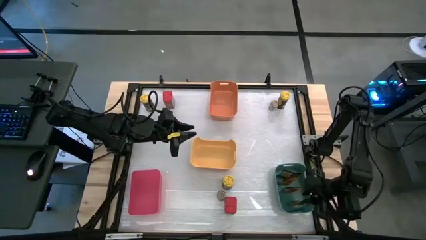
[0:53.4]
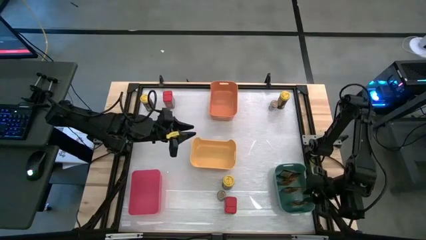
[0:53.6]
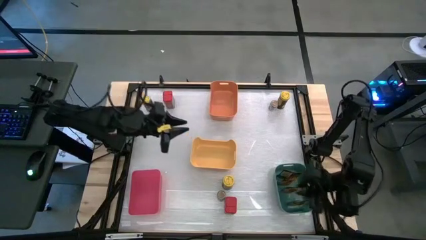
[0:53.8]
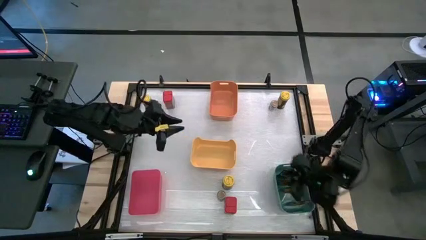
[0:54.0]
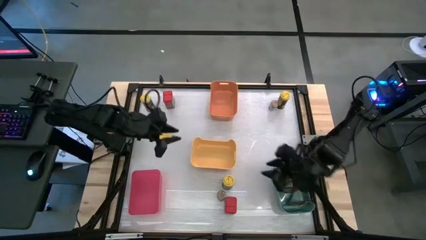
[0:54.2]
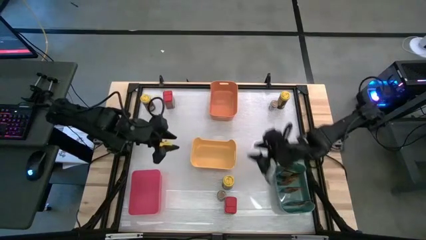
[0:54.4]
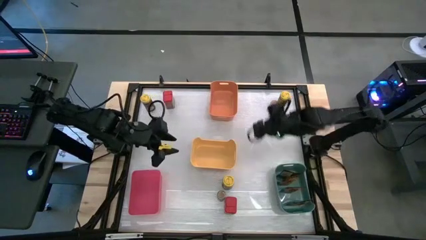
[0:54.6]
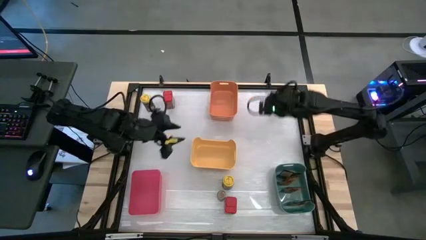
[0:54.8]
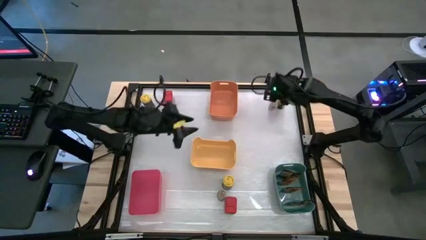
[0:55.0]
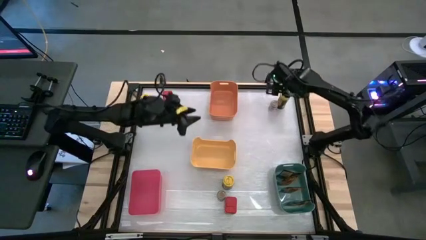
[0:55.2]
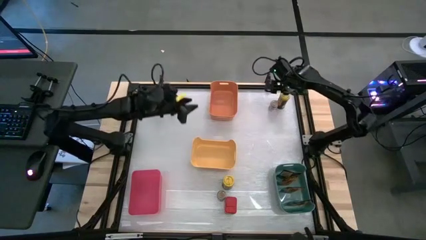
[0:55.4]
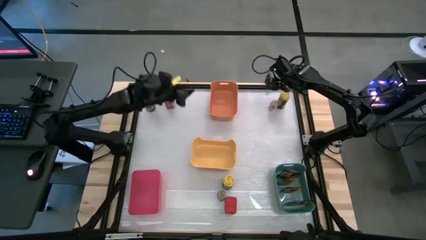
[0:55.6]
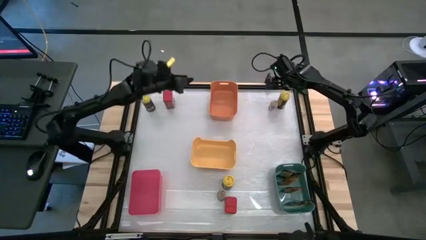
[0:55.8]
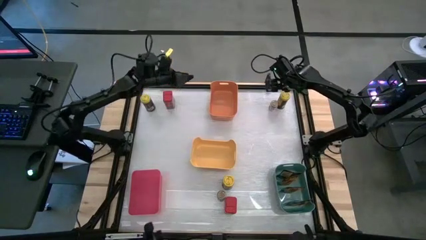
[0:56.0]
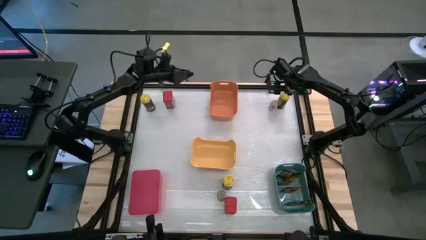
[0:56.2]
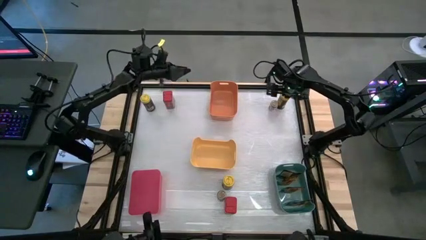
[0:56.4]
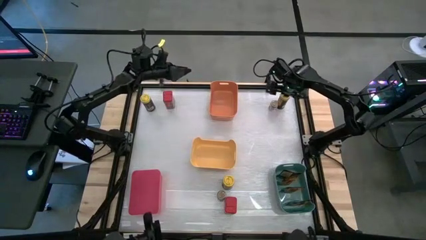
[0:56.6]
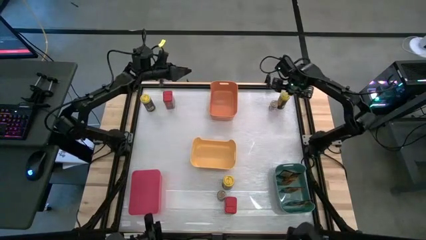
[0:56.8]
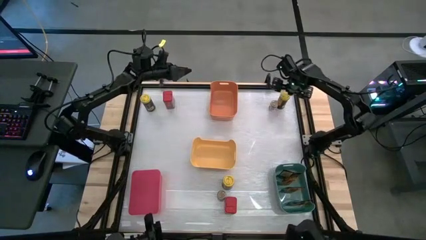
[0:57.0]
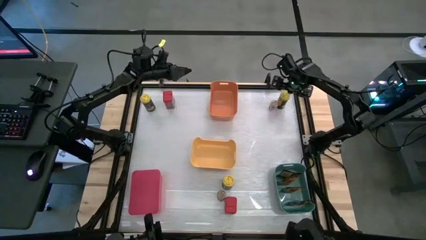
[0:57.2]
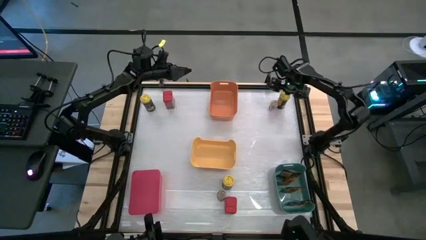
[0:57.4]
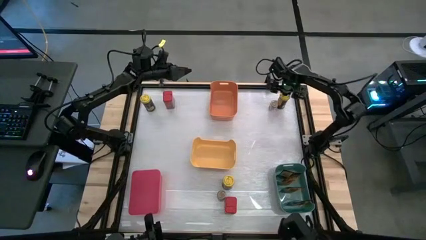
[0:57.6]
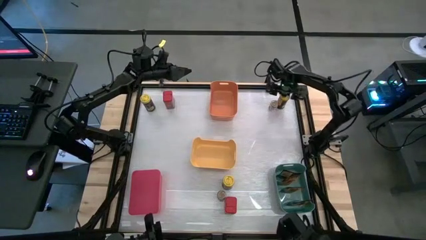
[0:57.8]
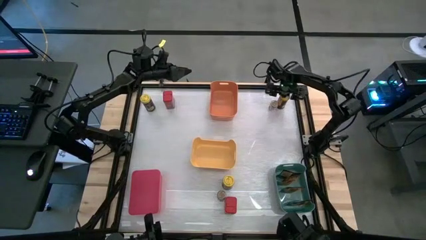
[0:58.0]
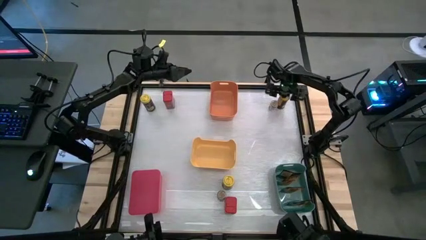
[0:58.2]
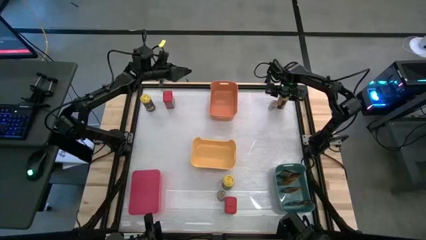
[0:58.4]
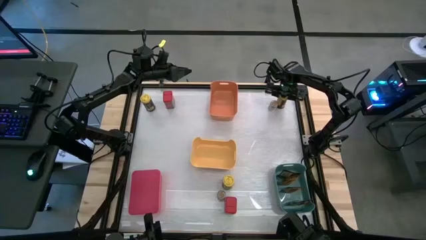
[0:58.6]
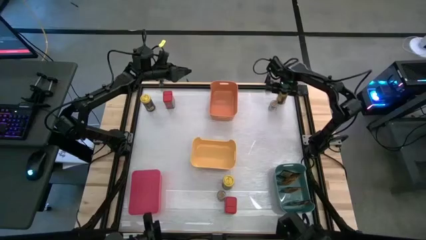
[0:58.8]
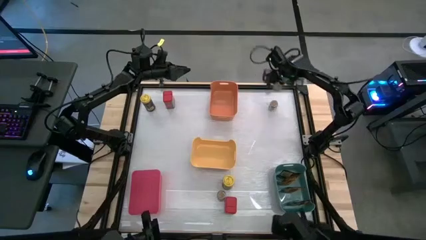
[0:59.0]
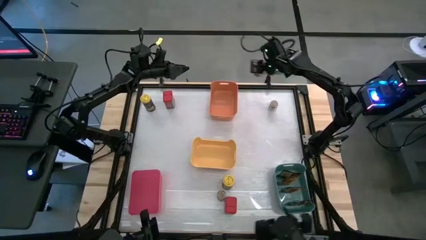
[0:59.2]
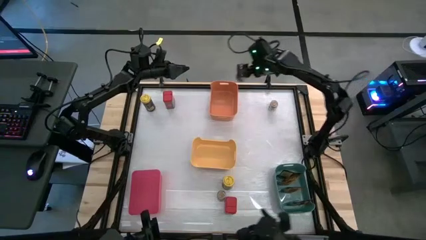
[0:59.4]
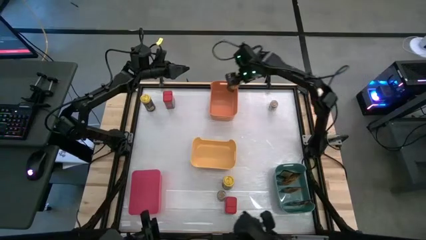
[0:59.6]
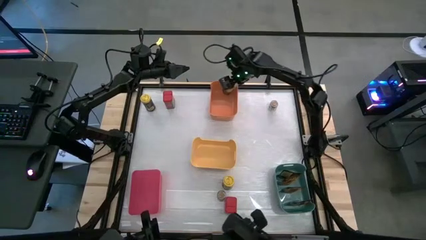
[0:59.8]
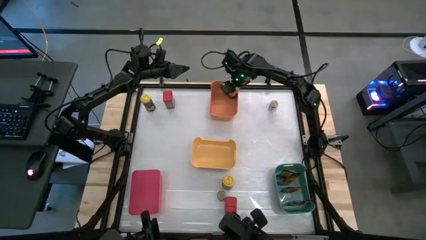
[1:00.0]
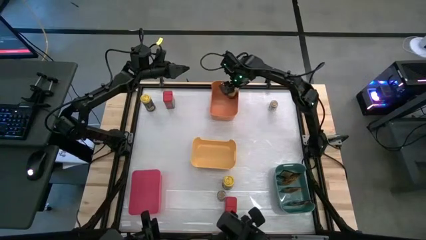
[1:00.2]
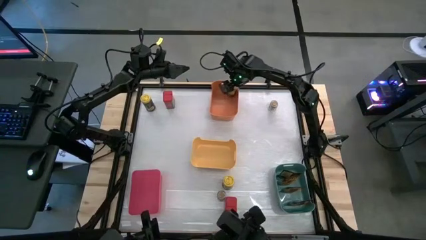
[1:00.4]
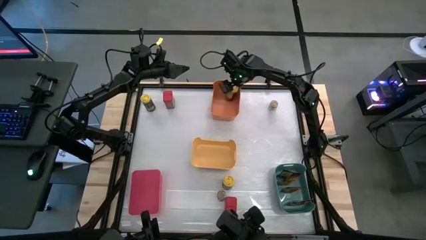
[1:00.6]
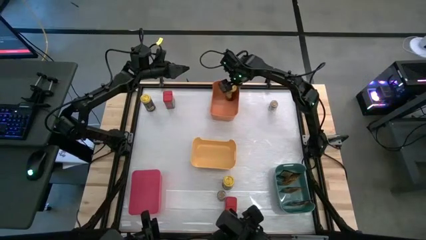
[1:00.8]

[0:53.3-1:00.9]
Task: Sort spices by type
Put the top right yellow seasoning bottle into the orange bin

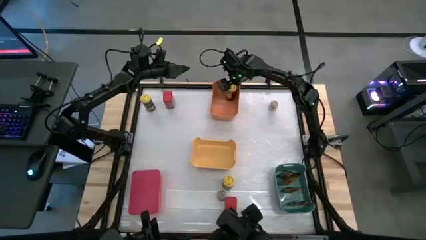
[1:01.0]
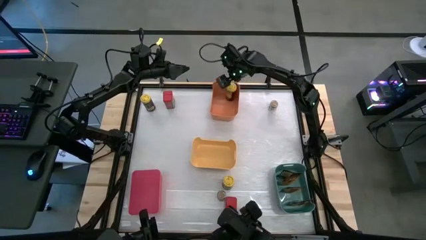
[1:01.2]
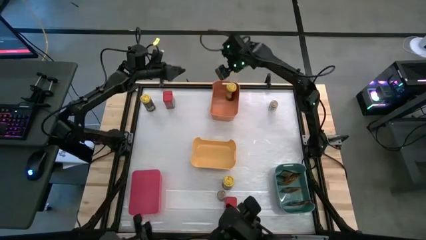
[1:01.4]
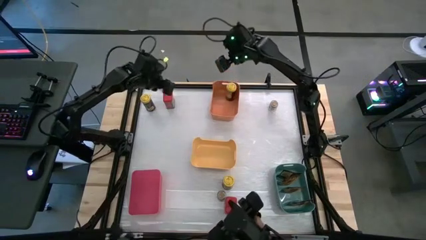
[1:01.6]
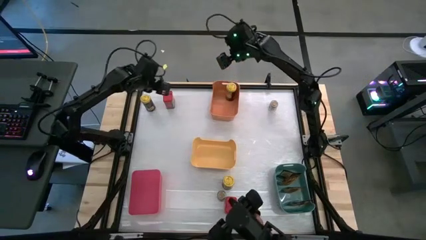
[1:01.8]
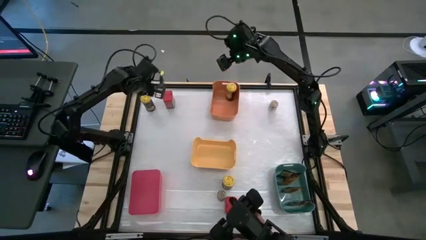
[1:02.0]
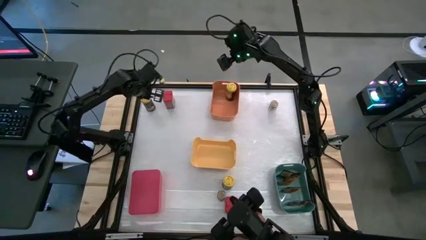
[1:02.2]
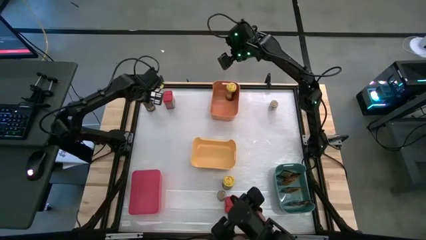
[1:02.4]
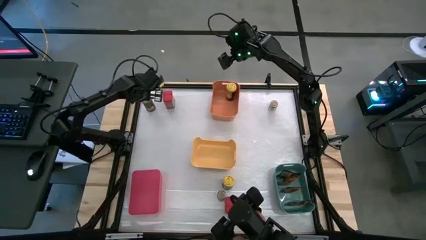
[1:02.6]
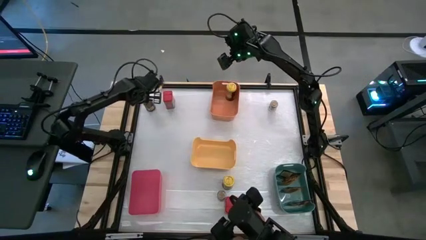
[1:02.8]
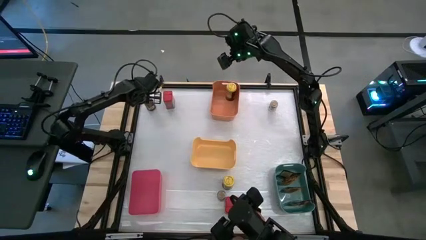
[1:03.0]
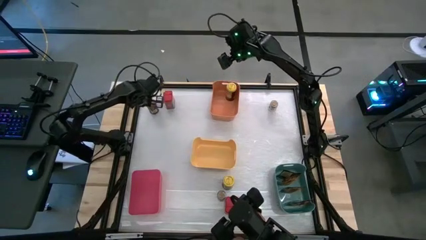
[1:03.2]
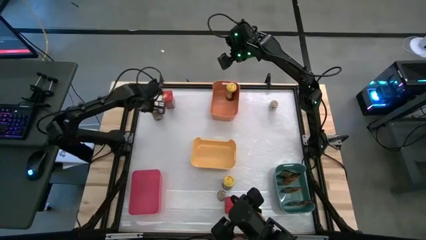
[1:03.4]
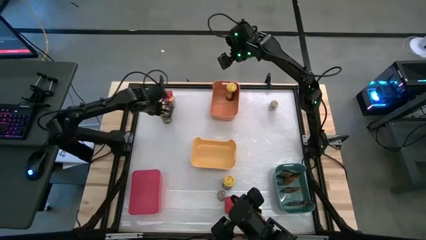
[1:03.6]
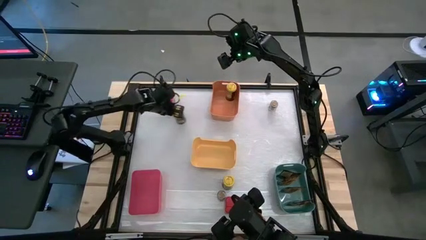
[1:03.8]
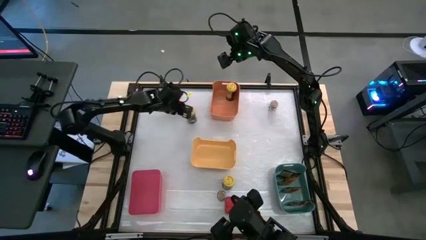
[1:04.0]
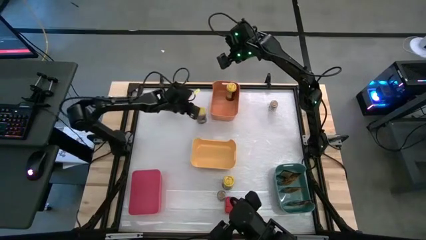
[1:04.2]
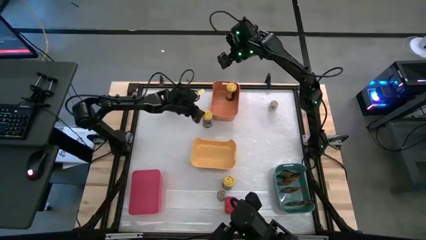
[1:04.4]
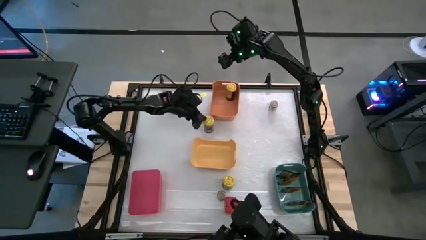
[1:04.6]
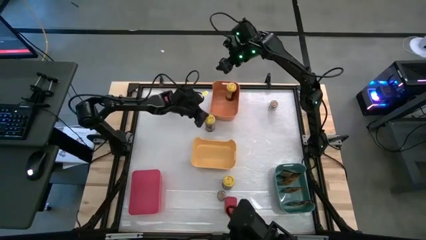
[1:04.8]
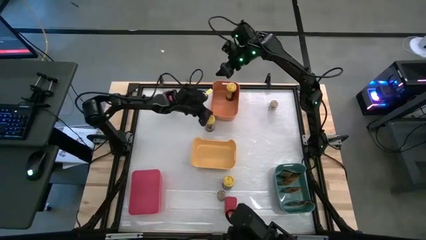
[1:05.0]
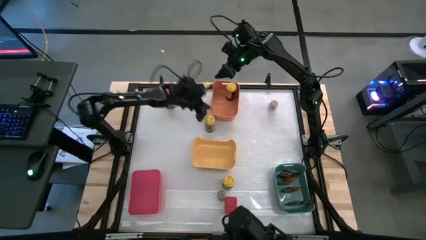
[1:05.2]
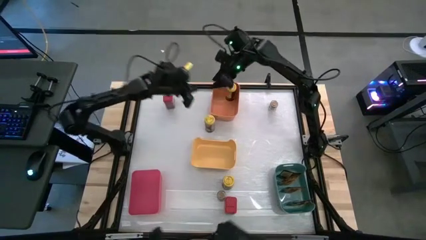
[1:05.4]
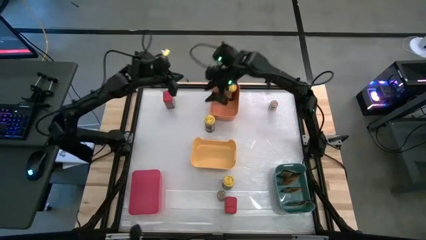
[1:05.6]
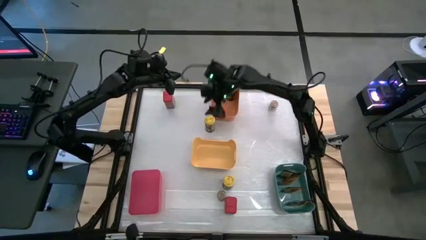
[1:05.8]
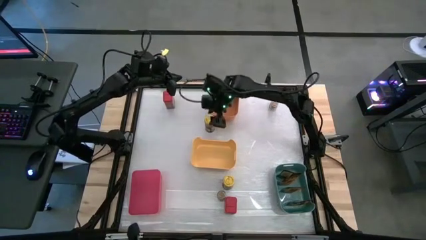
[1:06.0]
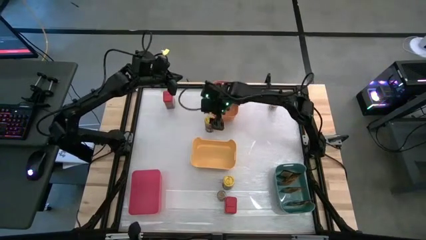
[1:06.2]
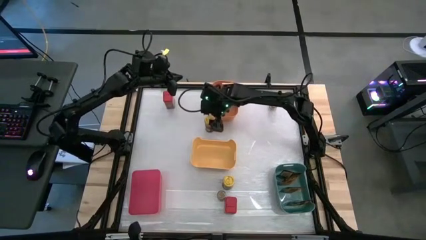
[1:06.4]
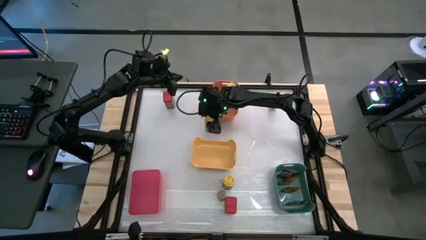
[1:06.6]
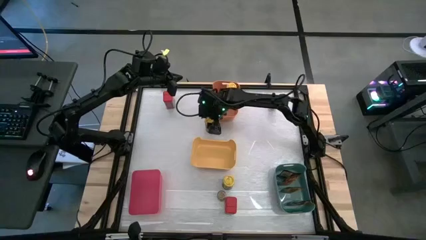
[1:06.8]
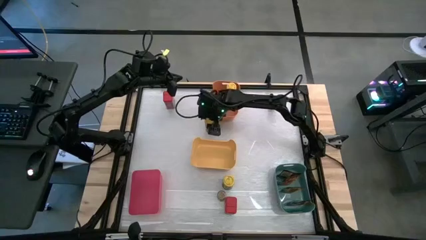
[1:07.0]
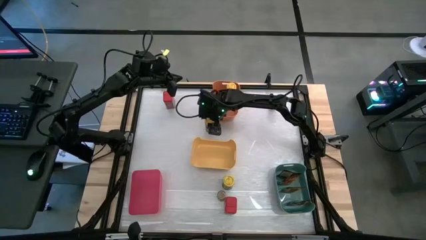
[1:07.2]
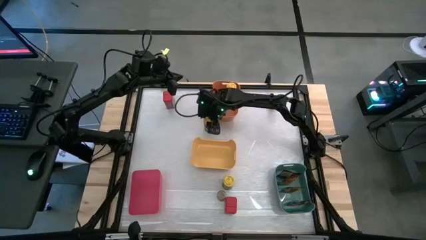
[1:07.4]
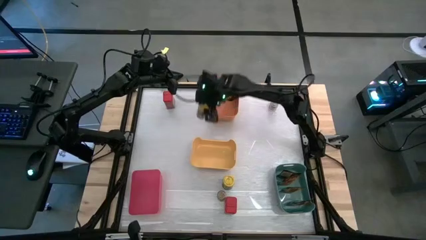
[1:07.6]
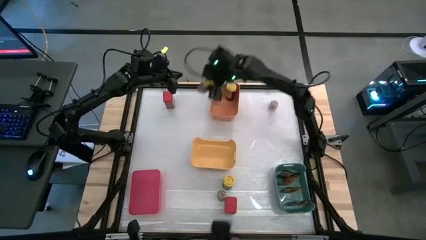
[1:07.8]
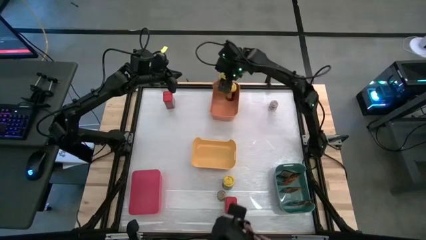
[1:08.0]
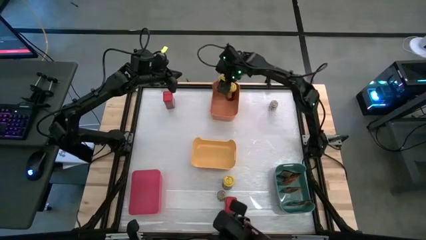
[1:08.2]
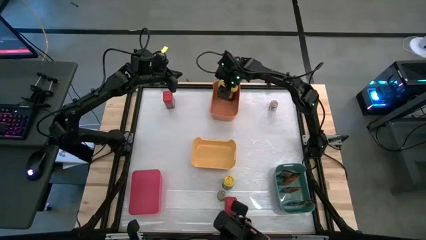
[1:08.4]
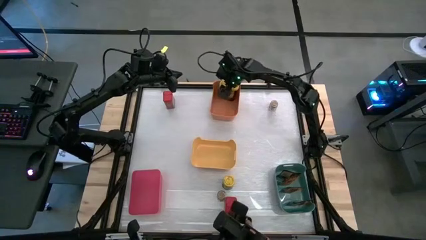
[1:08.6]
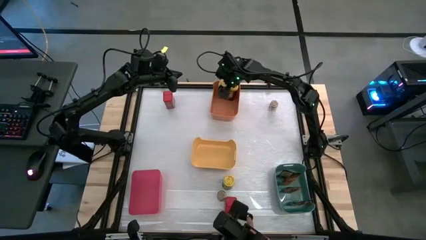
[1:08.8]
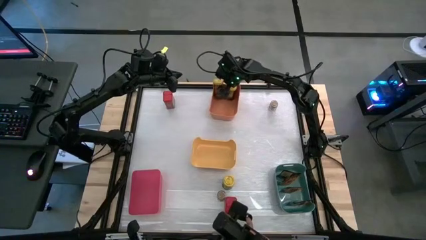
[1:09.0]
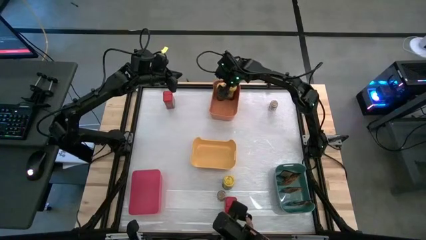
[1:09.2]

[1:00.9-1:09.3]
Put the top yellow seasoning bottle into the orange bin

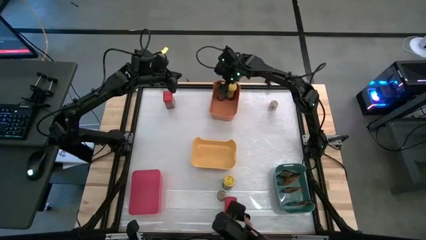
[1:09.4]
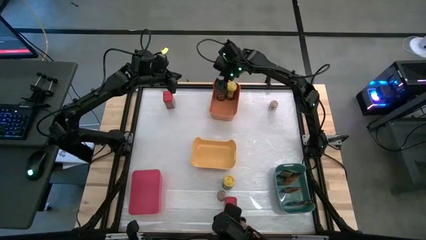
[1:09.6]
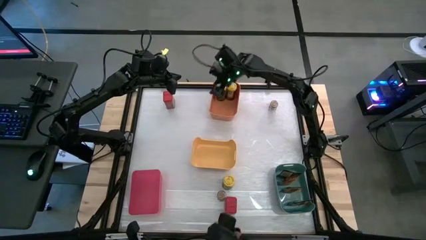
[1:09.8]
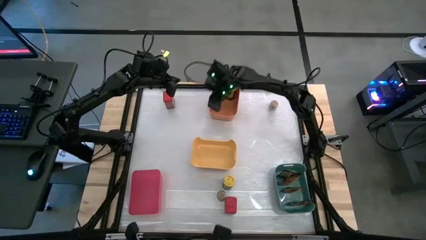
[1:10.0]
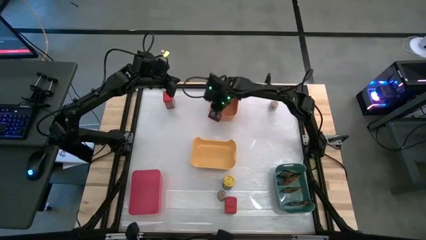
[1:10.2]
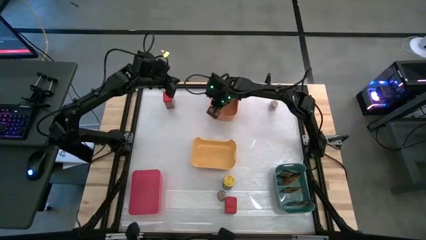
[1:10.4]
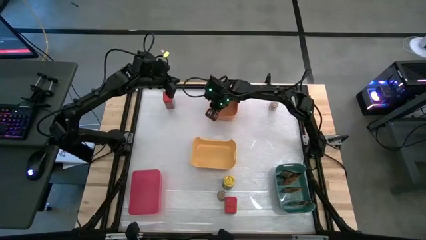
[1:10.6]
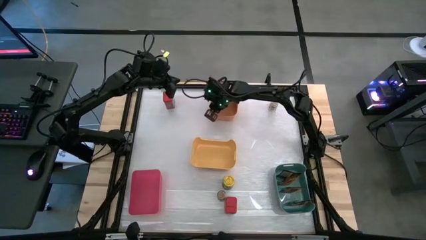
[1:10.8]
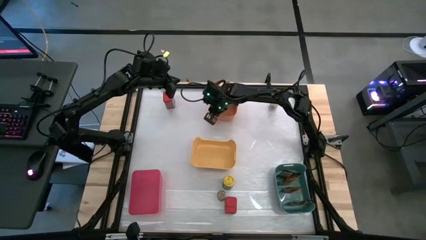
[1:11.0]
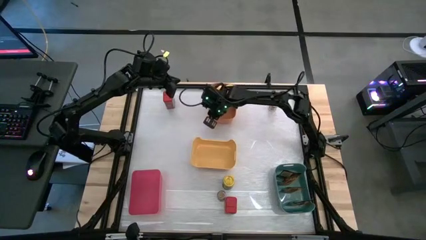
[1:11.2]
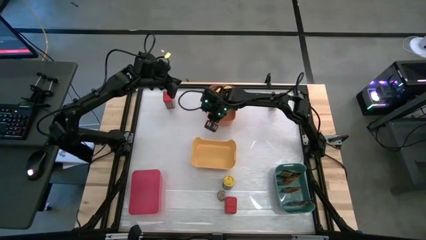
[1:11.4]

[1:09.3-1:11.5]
Adjust the orange bin on the table
